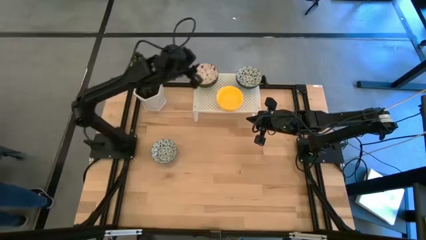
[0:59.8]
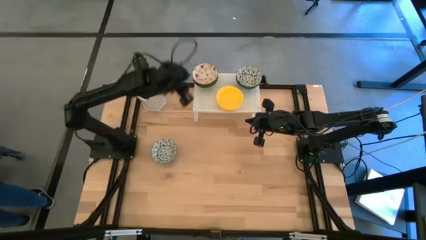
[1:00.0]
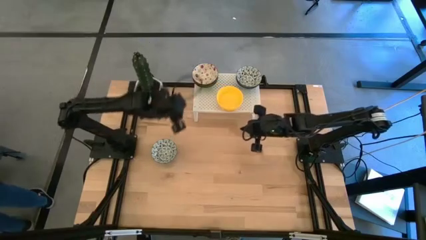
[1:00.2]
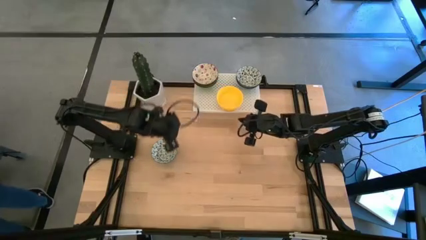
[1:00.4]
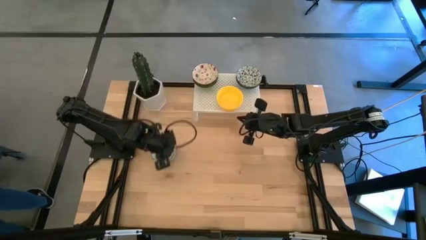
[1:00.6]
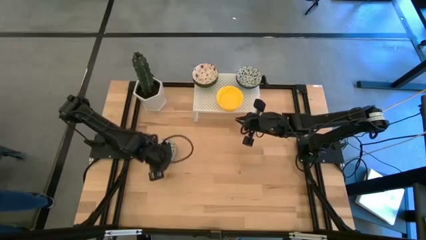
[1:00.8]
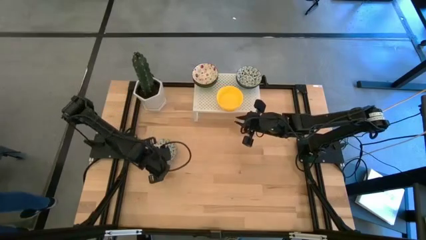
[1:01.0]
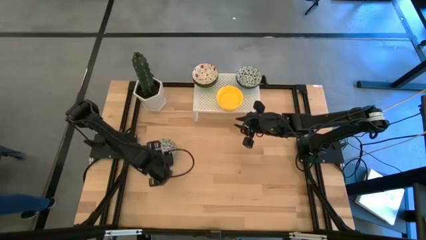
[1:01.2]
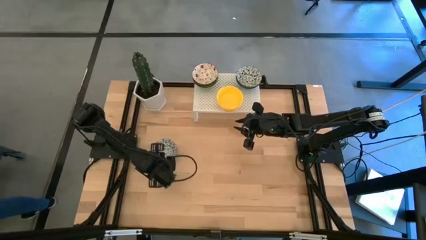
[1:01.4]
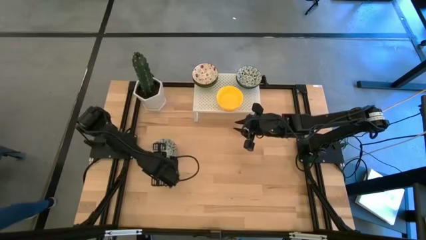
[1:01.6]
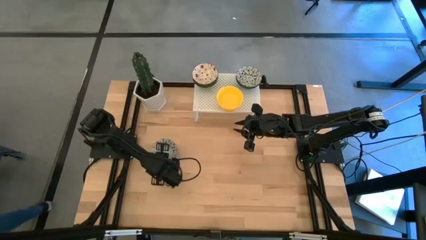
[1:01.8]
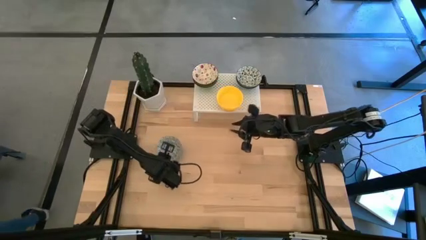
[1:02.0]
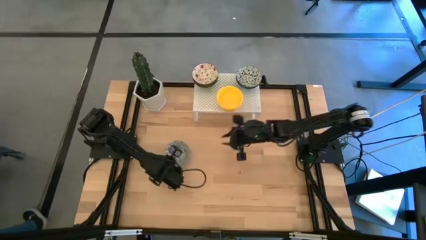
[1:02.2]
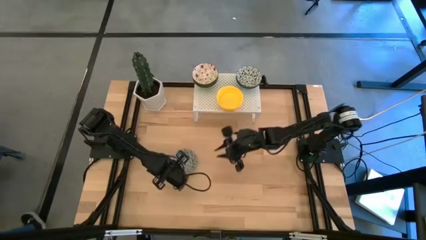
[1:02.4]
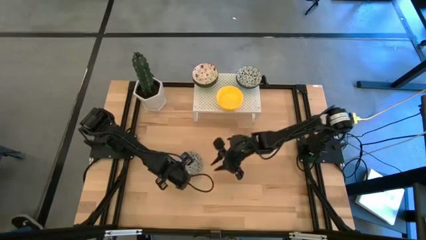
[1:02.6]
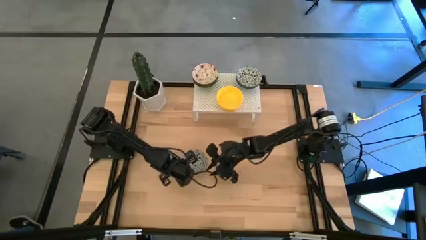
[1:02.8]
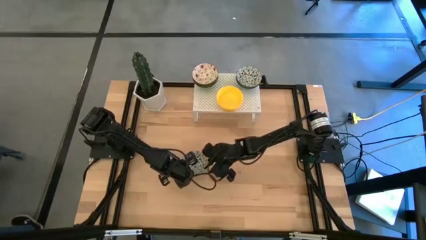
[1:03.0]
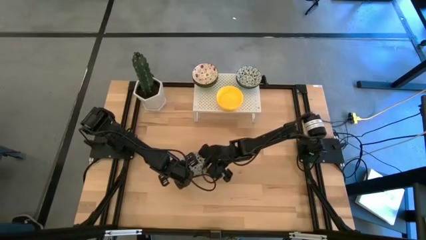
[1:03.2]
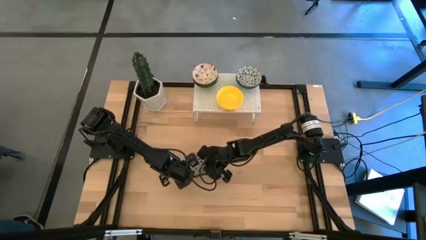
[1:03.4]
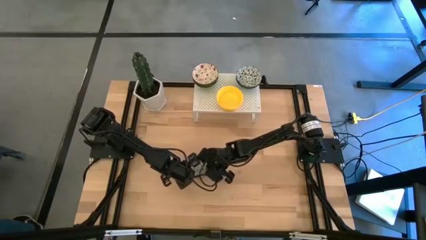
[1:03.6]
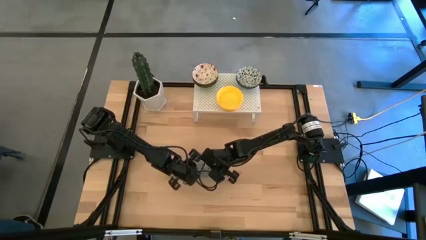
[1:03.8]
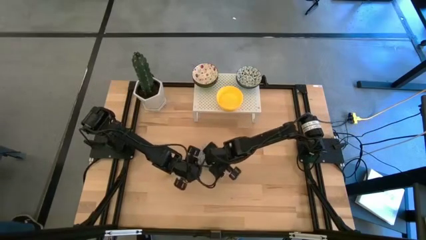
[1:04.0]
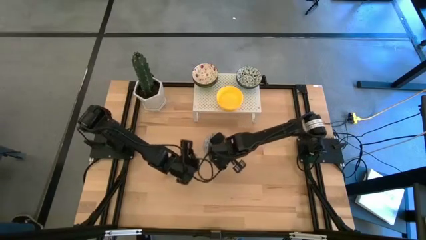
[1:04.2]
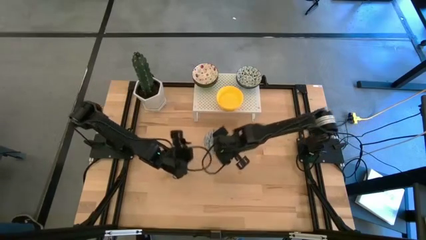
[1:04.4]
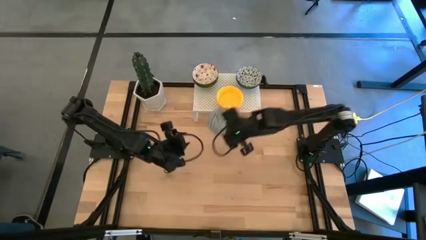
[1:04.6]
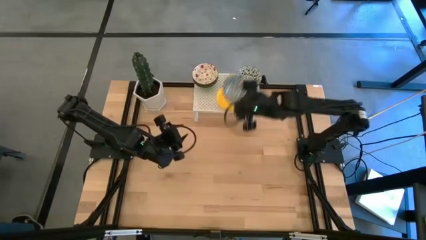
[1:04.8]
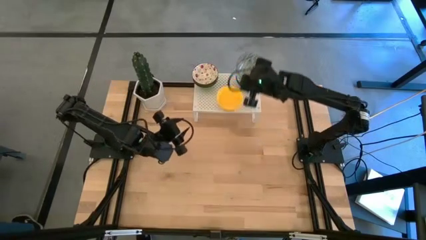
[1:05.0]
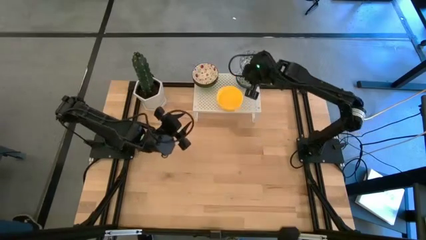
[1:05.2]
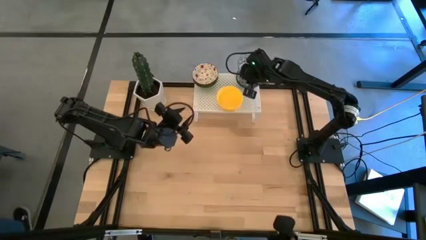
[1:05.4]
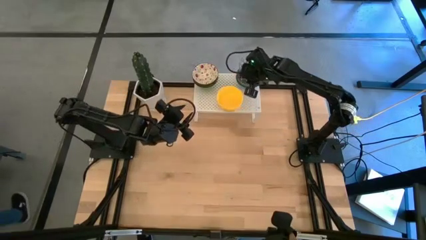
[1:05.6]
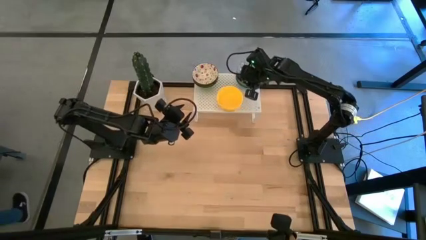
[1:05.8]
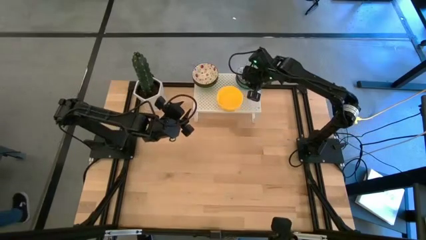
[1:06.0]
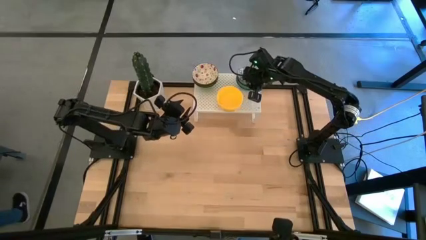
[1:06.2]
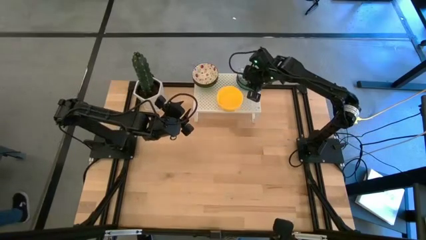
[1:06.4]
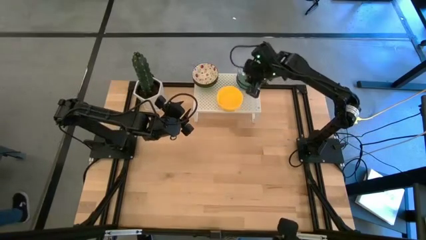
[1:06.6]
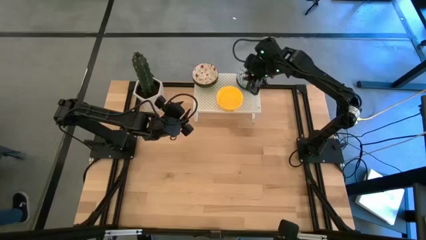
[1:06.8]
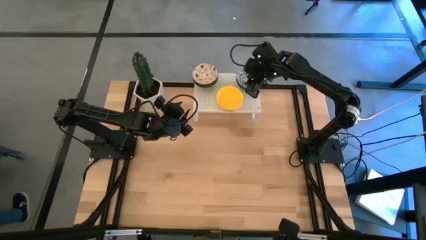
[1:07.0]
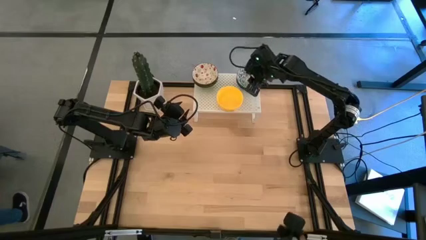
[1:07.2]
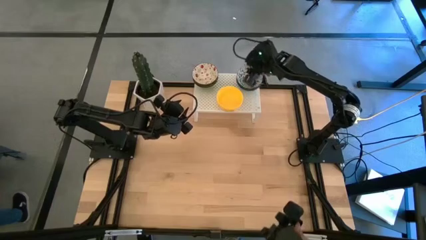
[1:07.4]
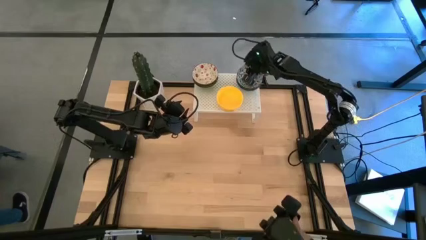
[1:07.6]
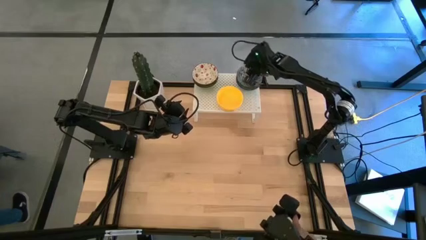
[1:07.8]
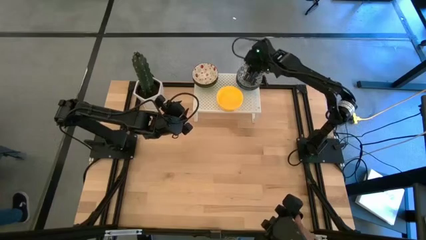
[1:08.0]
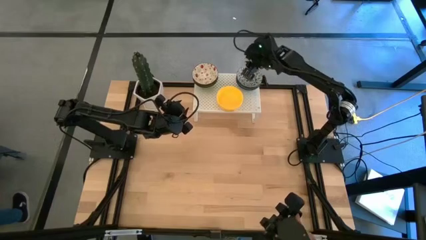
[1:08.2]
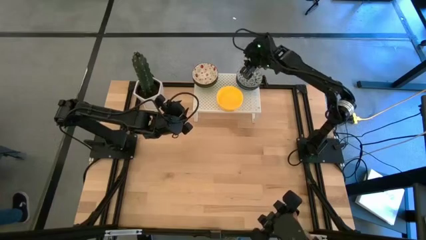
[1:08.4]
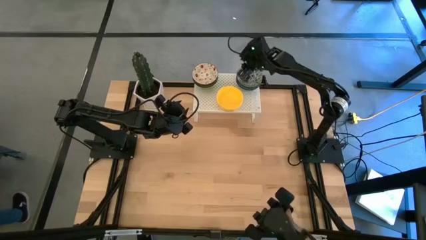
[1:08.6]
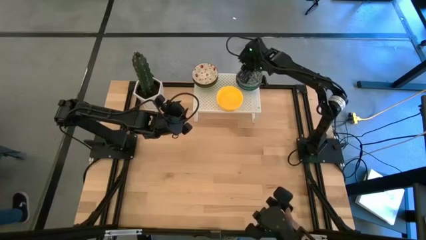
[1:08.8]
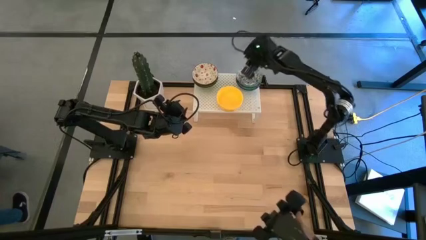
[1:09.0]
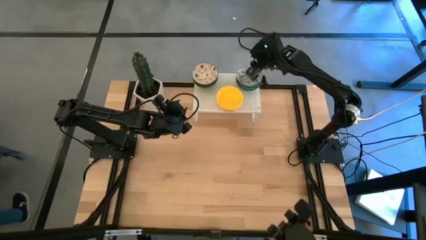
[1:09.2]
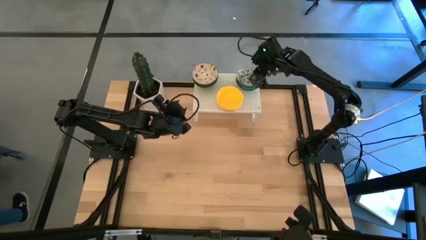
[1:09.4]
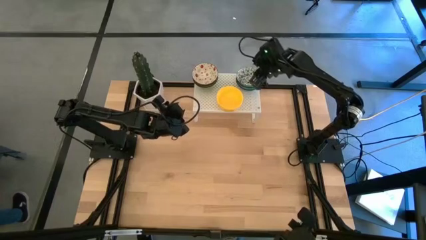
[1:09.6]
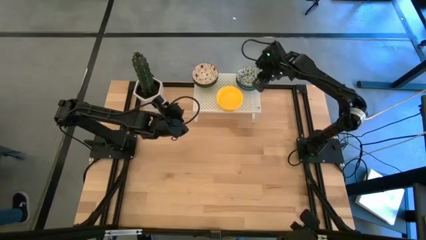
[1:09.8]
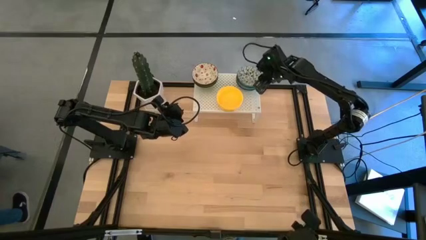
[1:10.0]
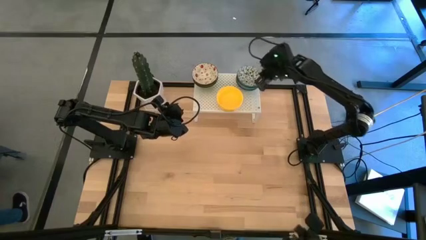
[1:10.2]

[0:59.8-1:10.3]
Task: Pick & Place Mini bowls
Stack the blue patterned bowl on top of the other blue patterned bowls on the shelf

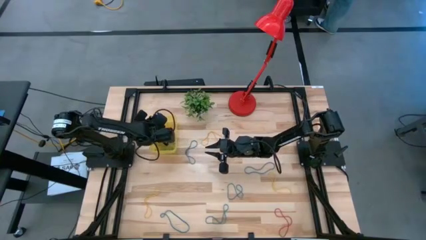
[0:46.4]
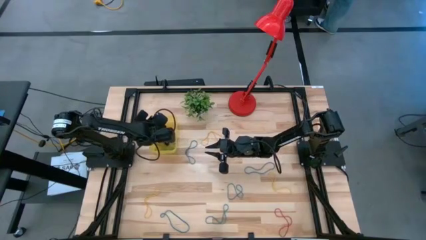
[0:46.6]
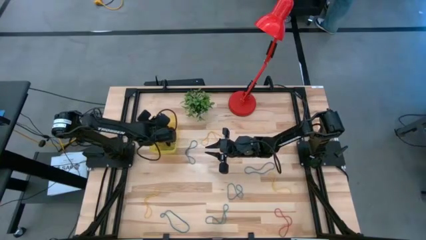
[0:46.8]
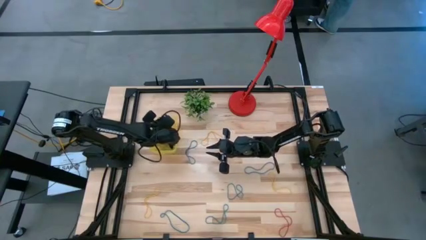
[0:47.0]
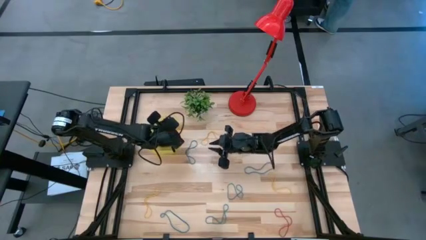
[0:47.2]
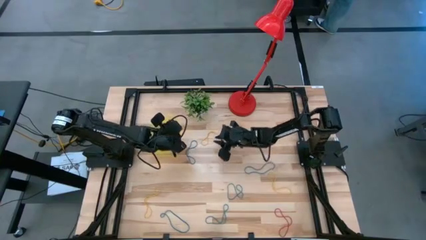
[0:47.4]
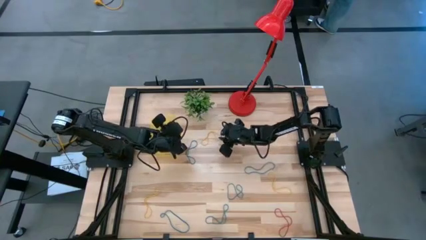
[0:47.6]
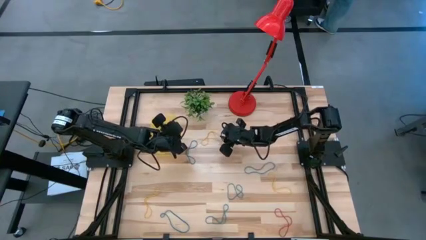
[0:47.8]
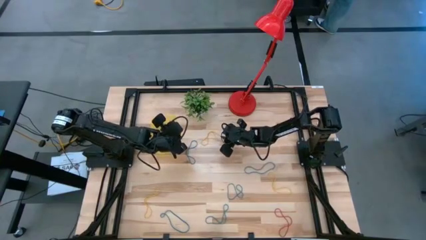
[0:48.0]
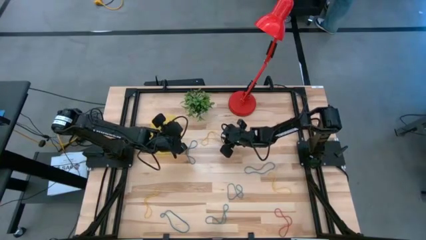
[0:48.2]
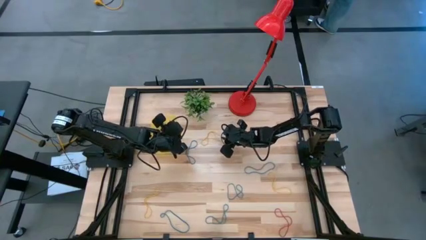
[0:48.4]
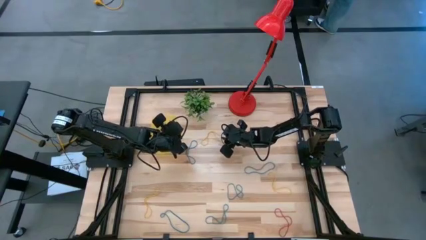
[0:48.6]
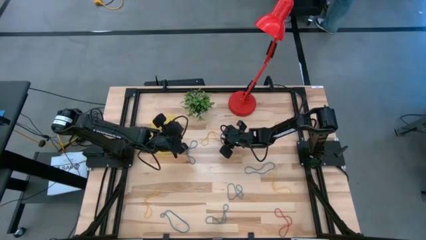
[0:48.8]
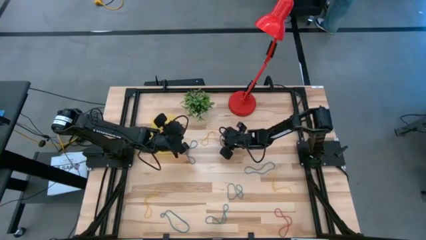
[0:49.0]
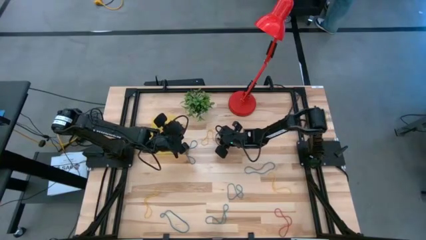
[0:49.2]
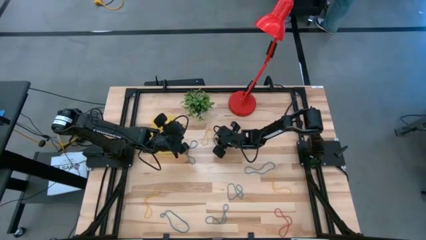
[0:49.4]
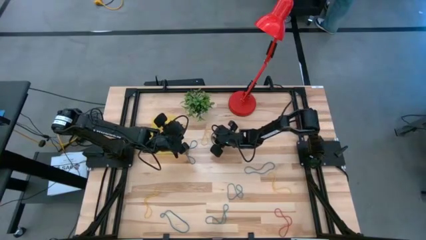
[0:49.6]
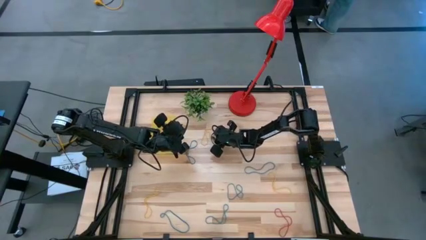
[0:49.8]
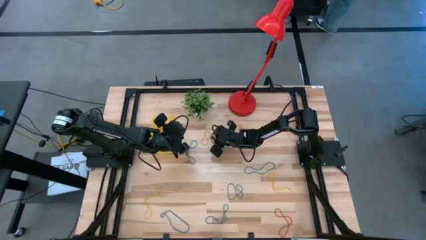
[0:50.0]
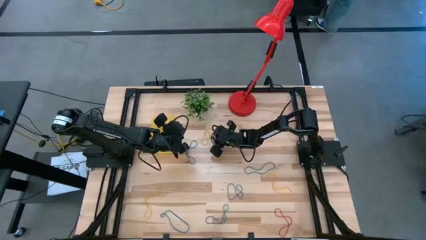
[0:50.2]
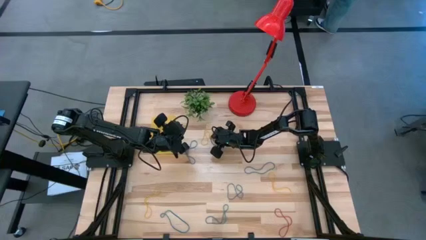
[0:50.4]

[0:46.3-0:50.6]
Task: Pick and place items into bin
Put the yellow rubber band into the yellow bin
